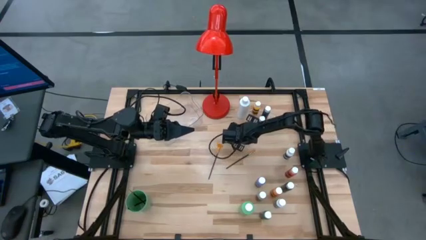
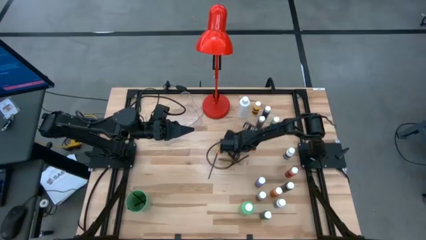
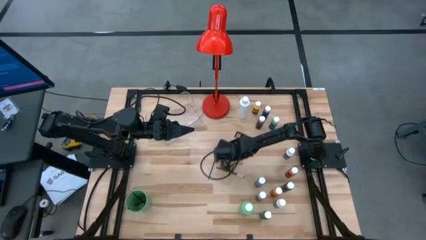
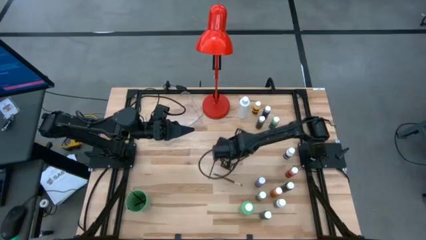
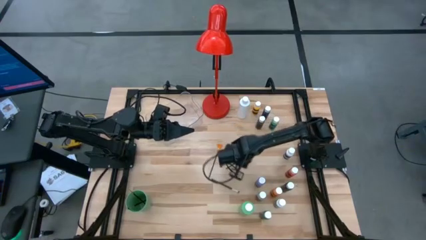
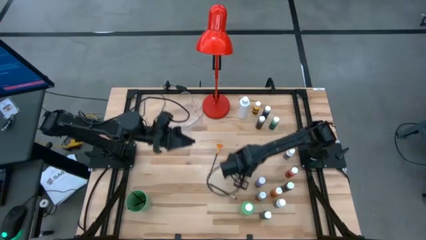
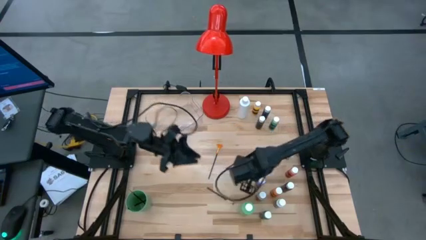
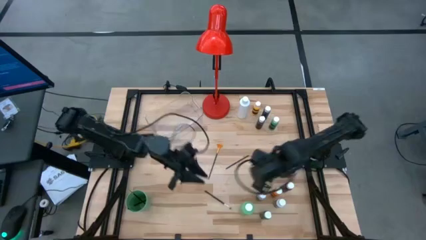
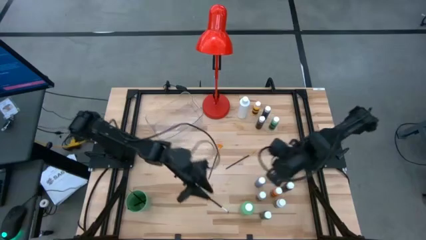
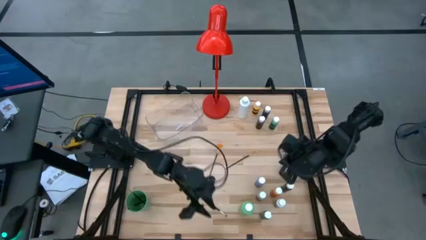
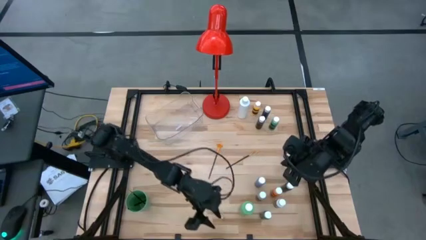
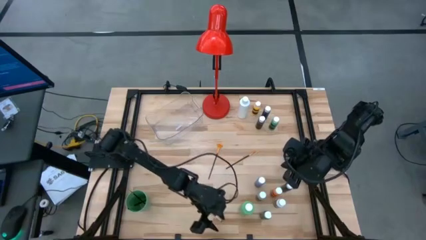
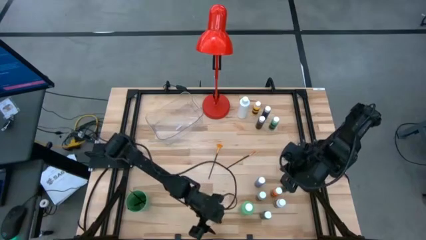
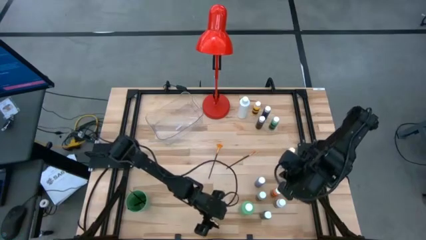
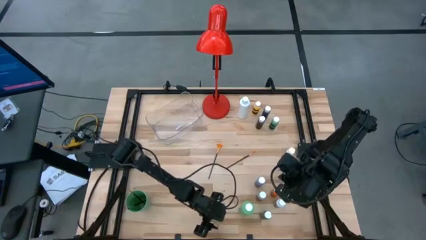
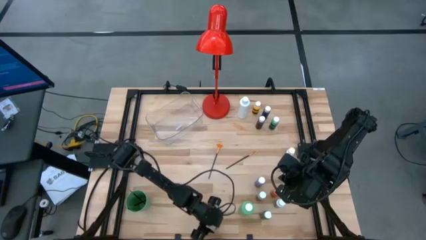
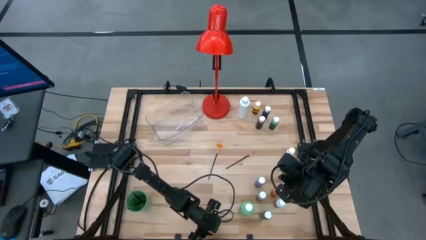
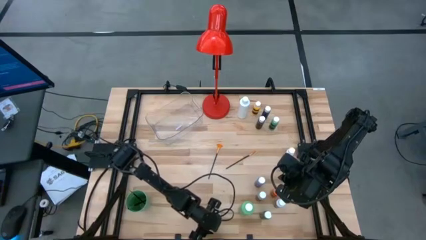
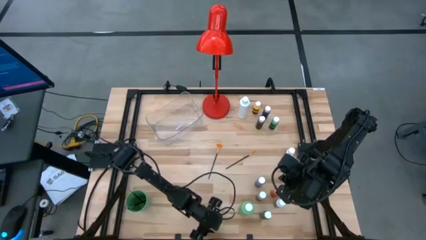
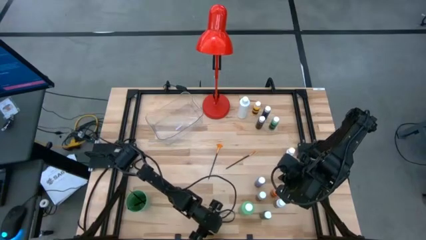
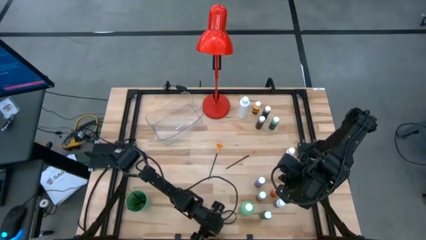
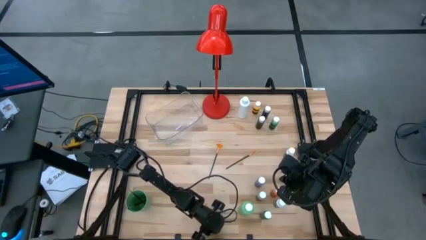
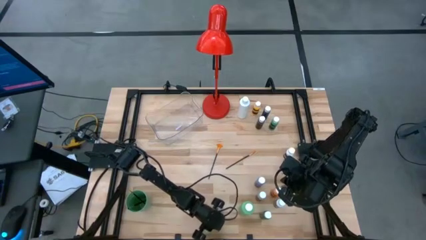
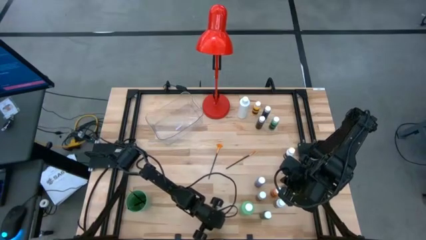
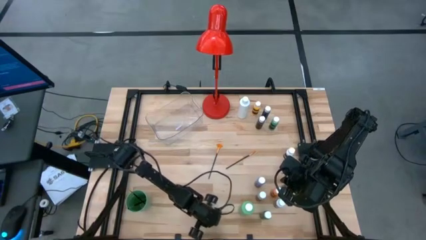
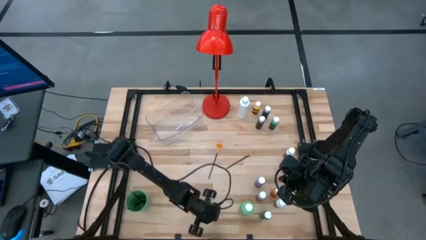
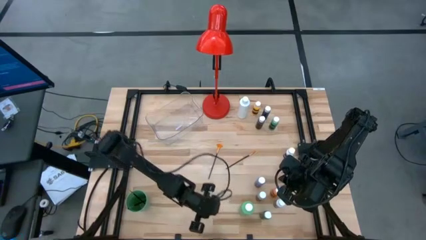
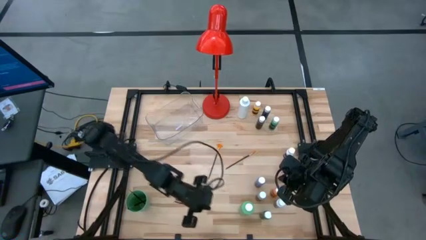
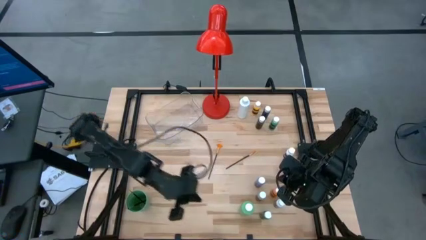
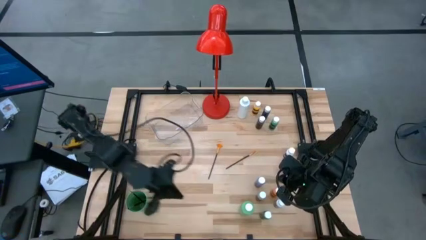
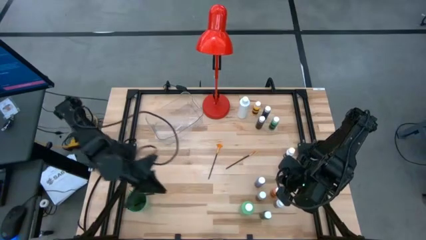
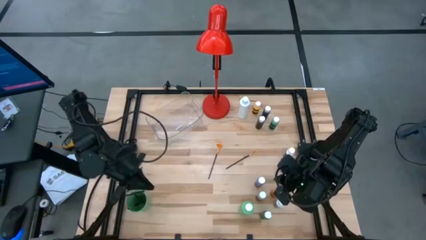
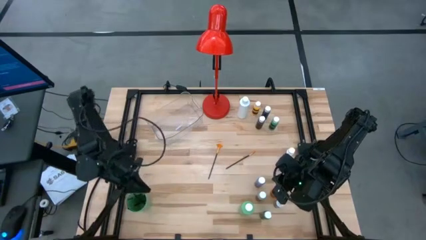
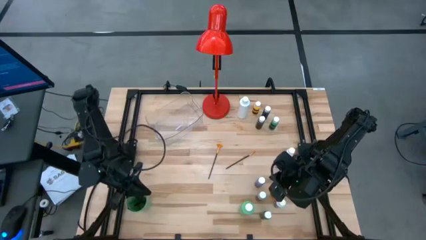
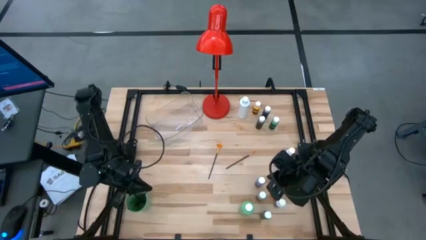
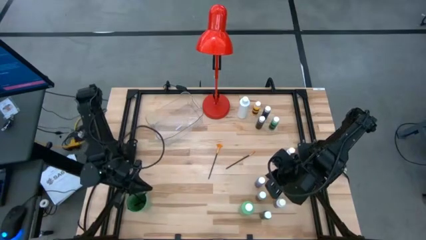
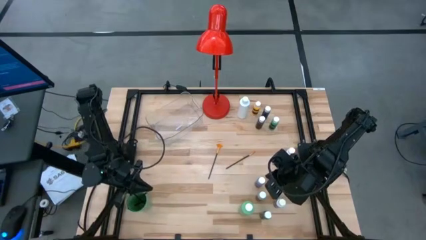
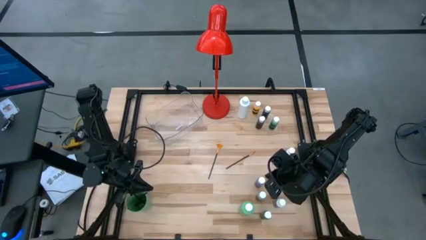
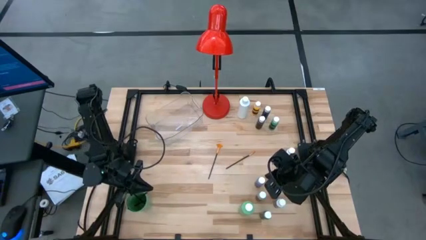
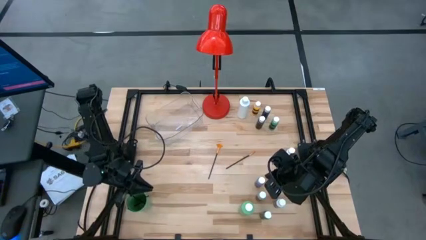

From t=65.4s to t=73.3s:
Task: Pick & Place Paint Supplies
Put the black paintbrush into the green cup

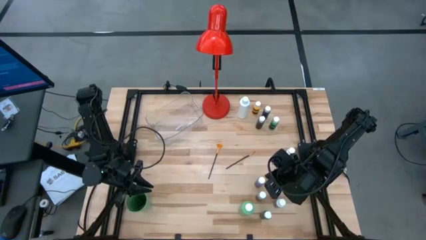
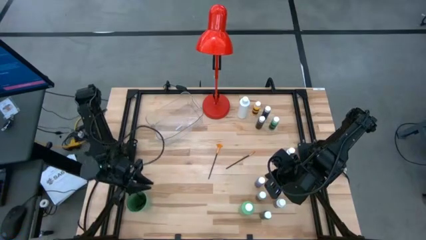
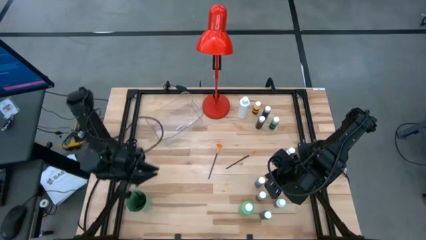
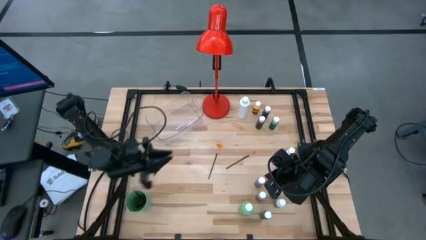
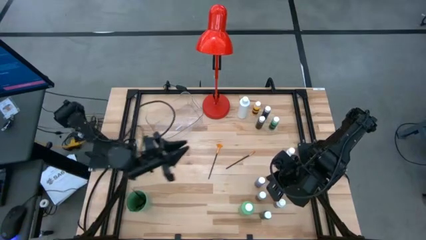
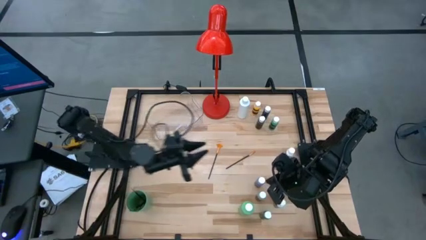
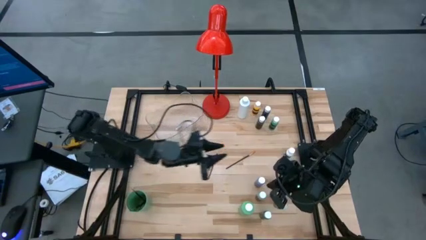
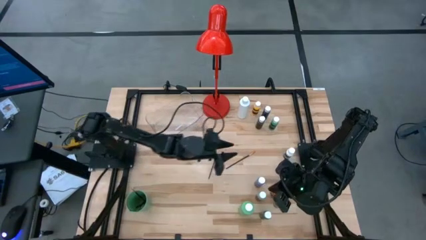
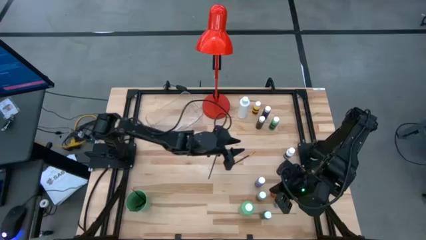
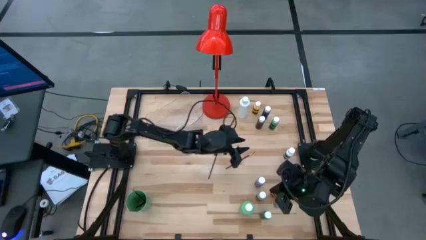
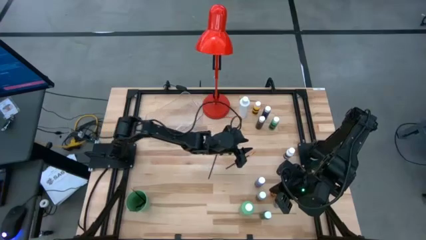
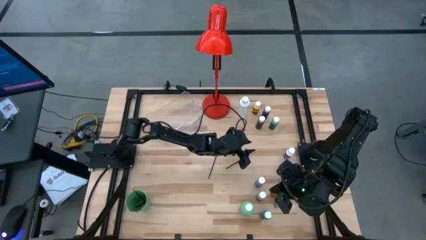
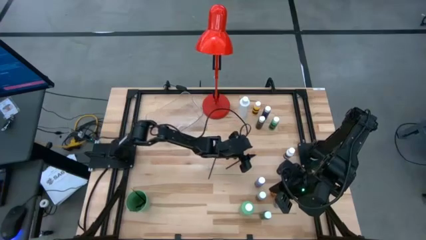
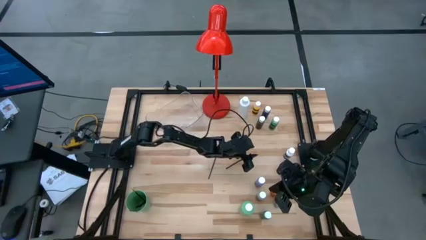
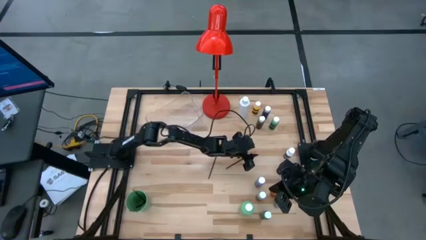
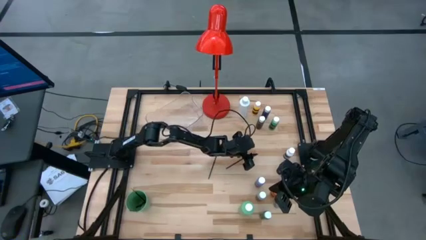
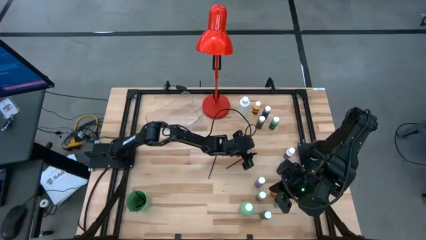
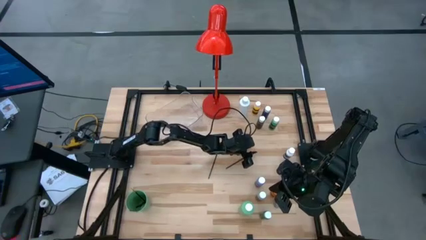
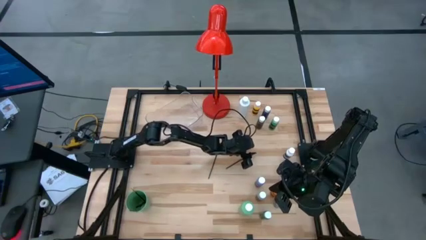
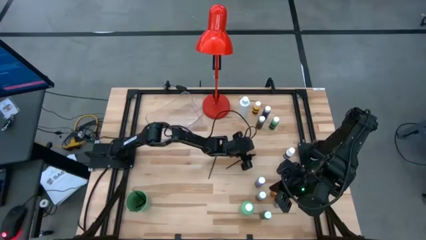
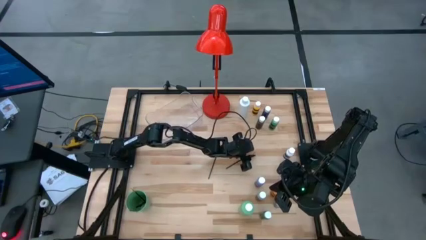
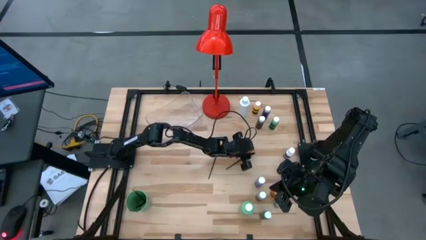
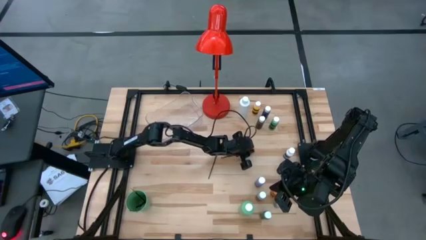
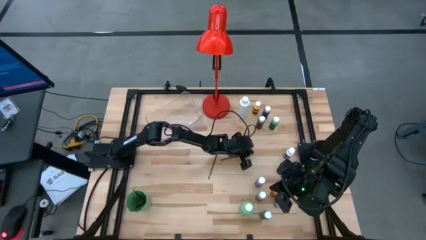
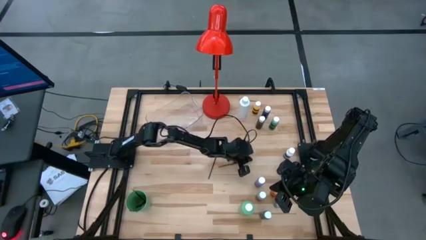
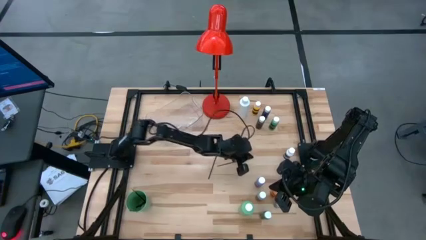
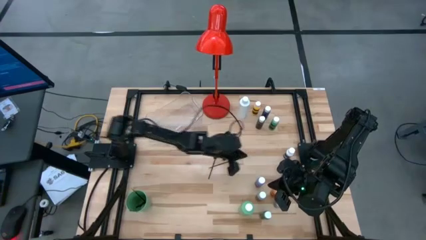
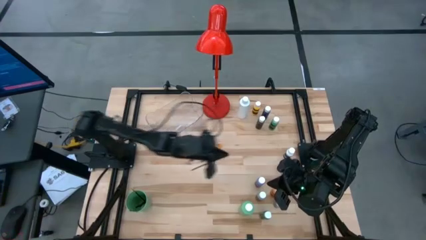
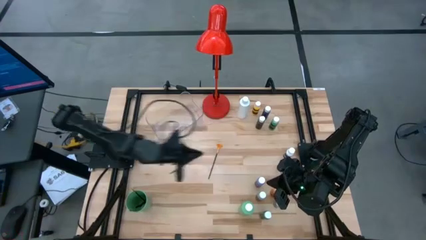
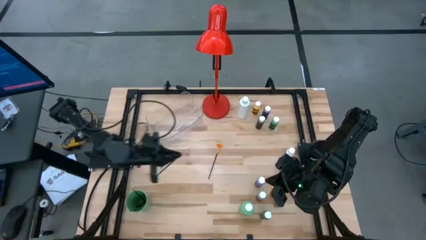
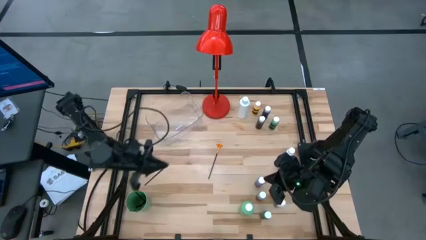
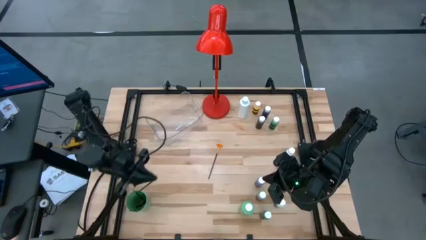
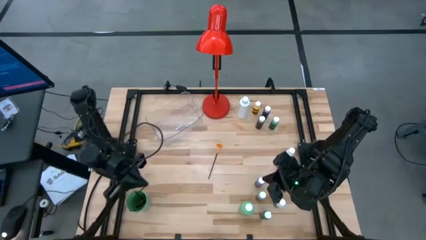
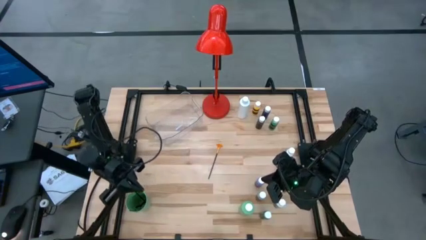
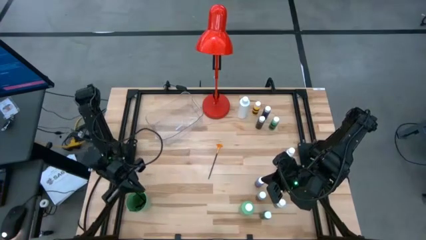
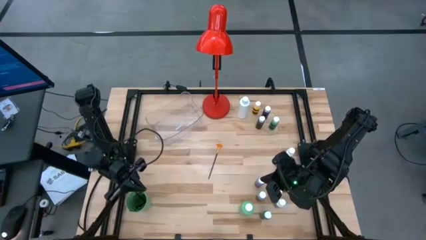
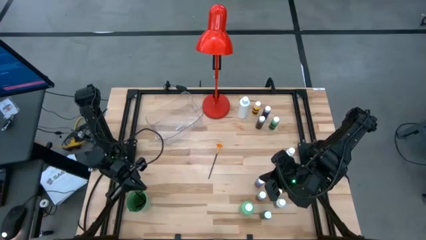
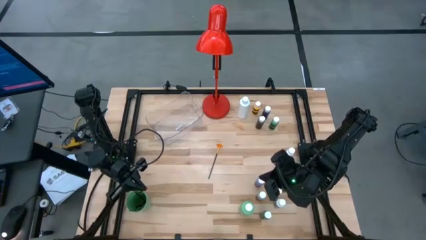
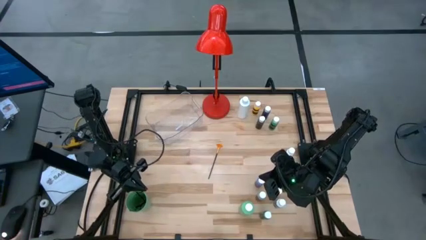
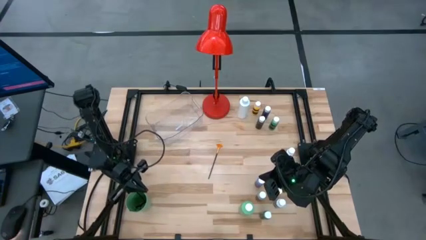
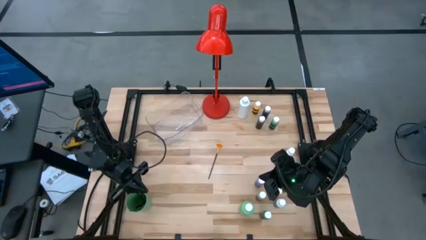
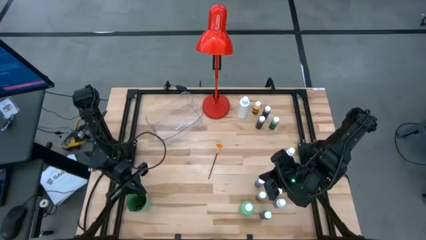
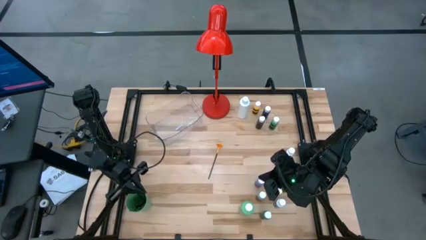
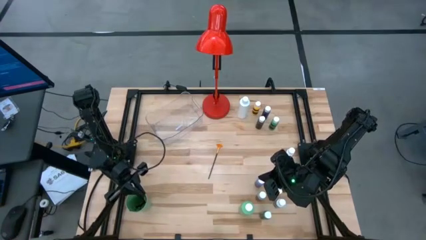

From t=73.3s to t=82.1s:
Put the black paintbrush into the green cup
